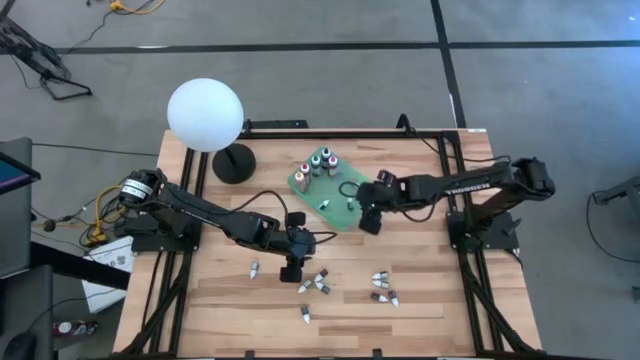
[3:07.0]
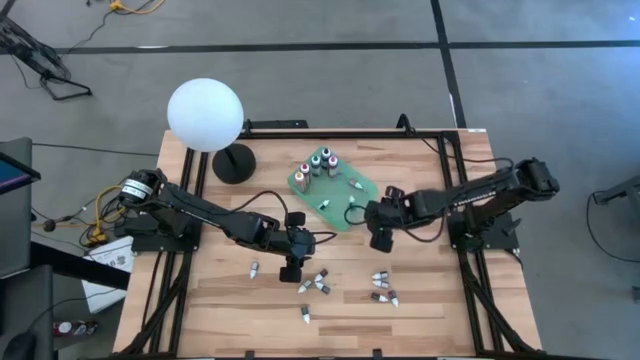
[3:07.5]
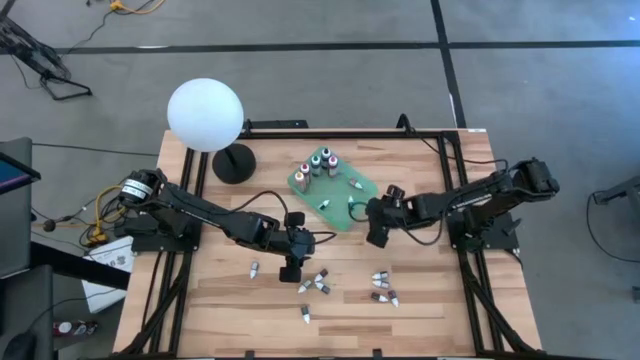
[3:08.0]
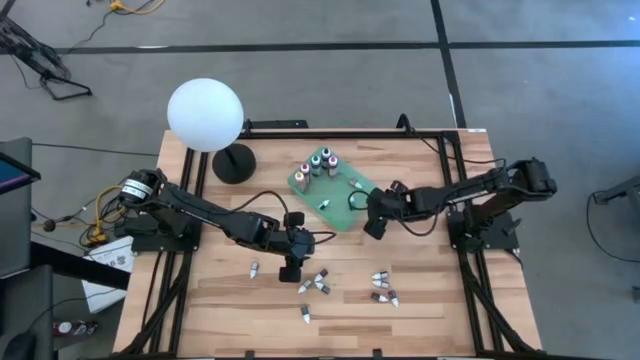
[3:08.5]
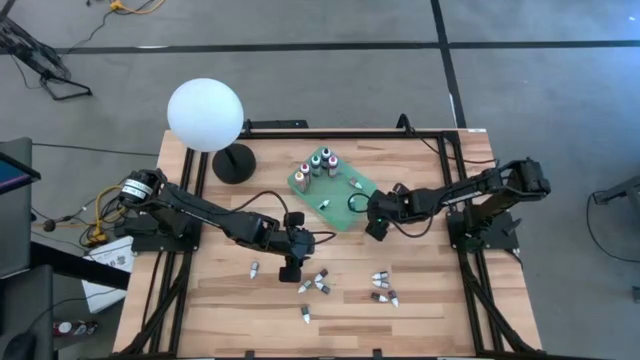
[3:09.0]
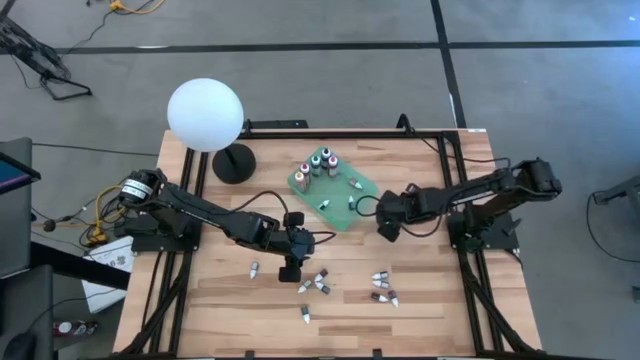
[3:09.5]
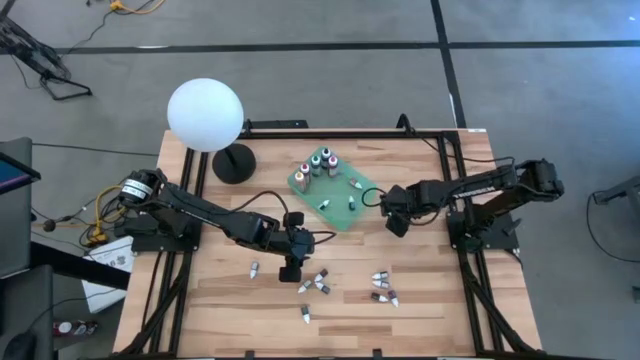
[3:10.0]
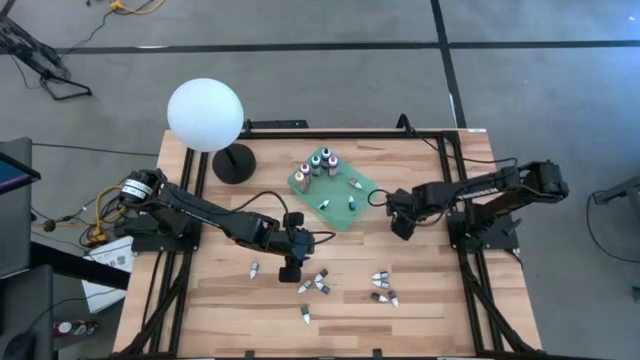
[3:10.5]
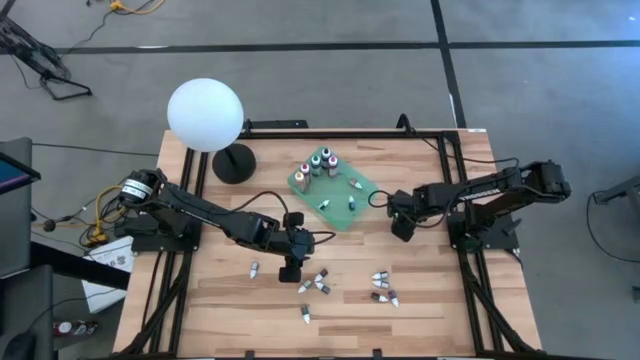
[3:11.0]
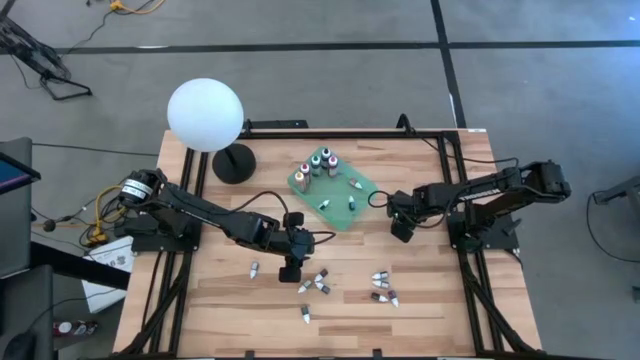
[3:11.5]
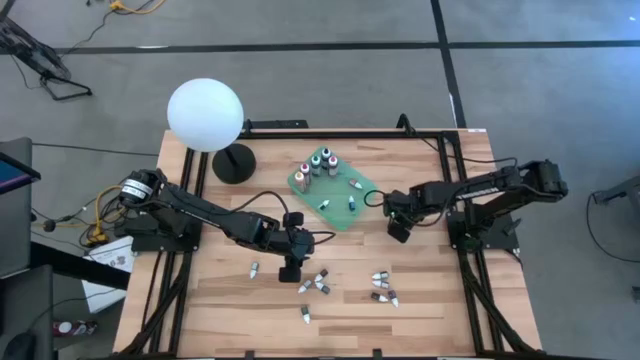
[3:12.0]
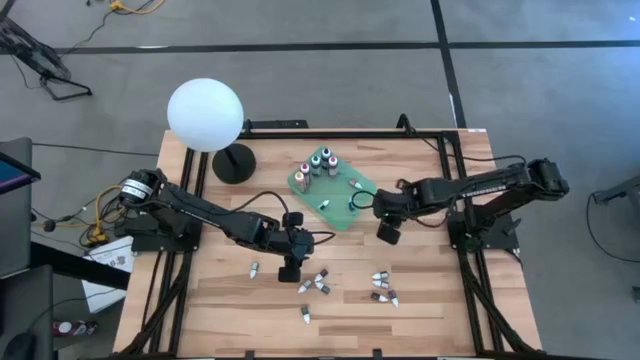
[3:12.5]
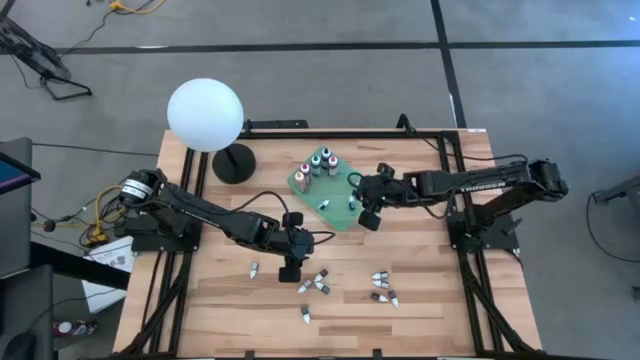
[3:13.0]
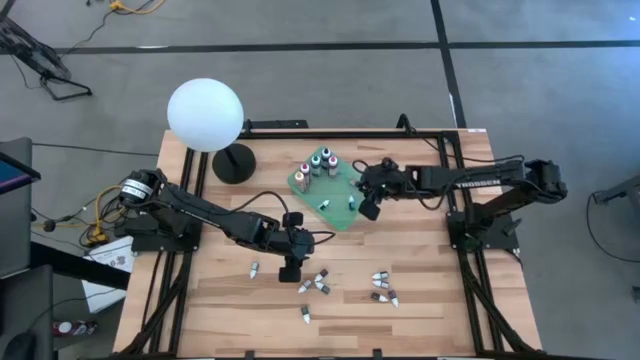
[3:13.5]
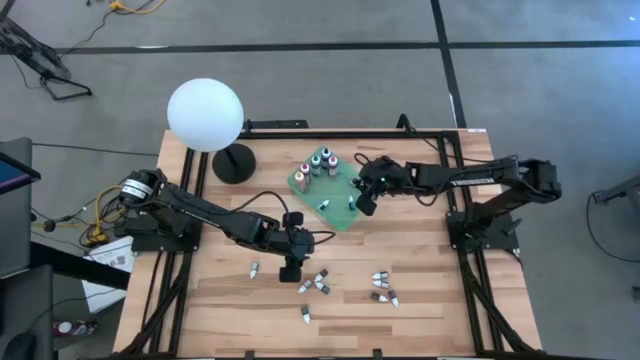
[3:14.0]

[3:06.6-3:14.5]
Task: Pick & Place food coloring
Put the small black food coloring bottle into the green bin

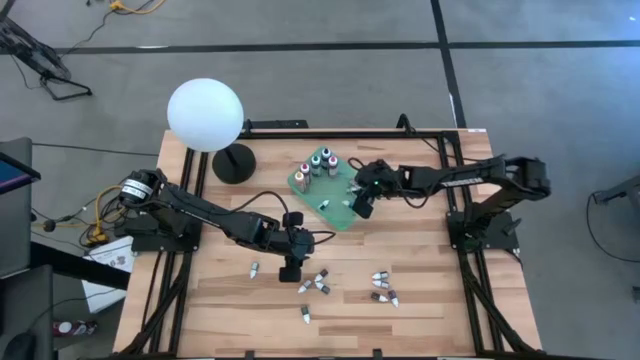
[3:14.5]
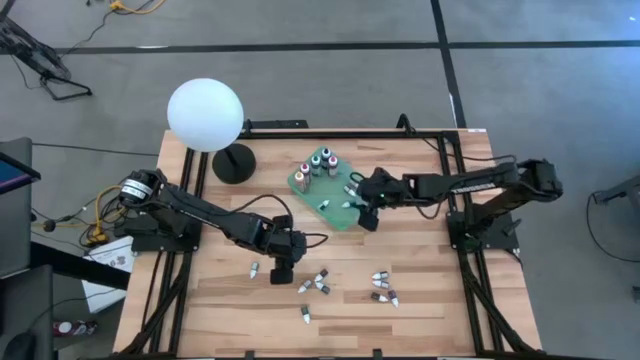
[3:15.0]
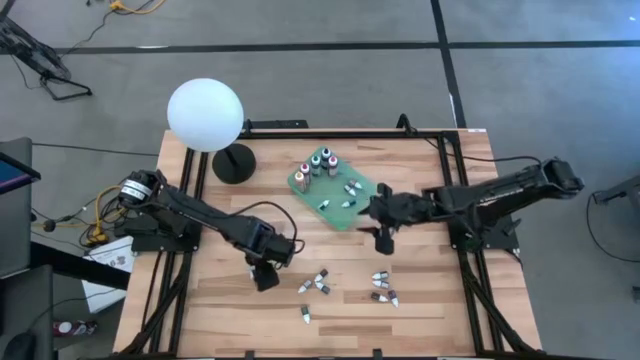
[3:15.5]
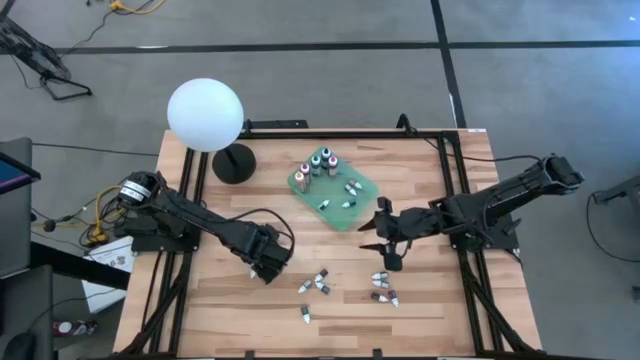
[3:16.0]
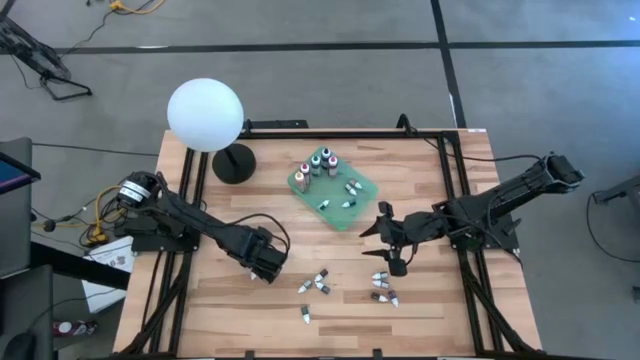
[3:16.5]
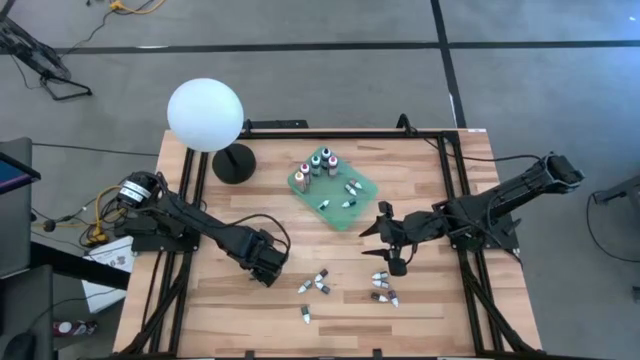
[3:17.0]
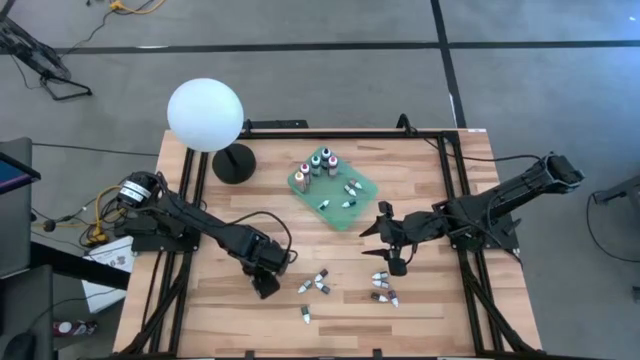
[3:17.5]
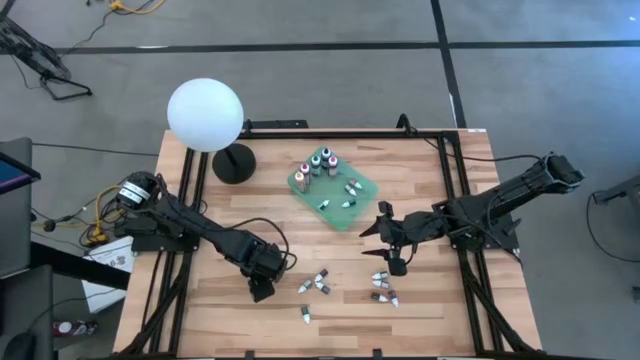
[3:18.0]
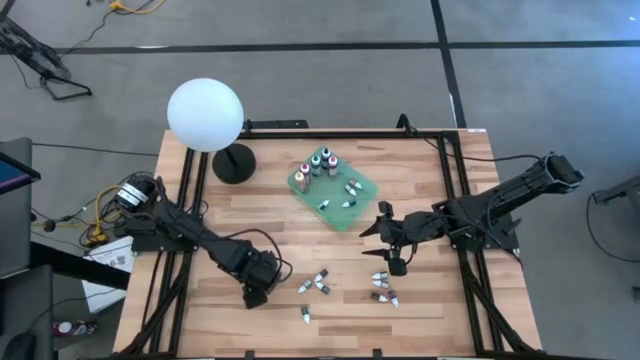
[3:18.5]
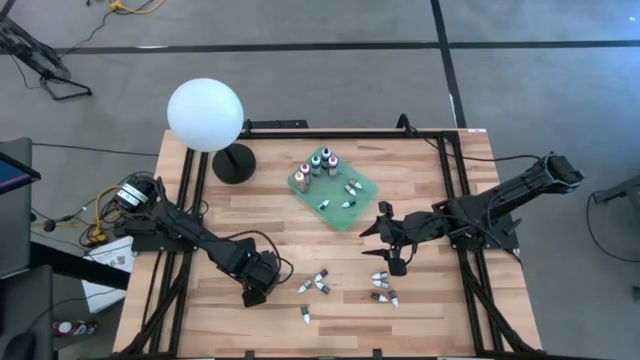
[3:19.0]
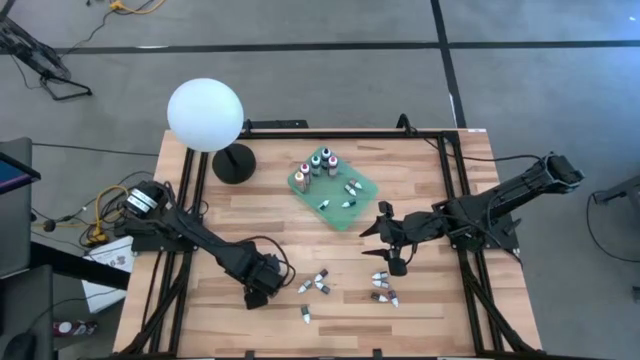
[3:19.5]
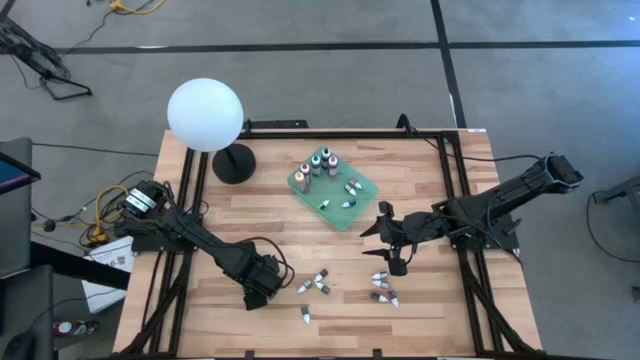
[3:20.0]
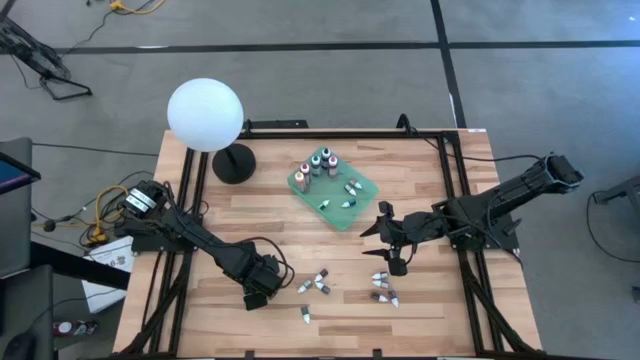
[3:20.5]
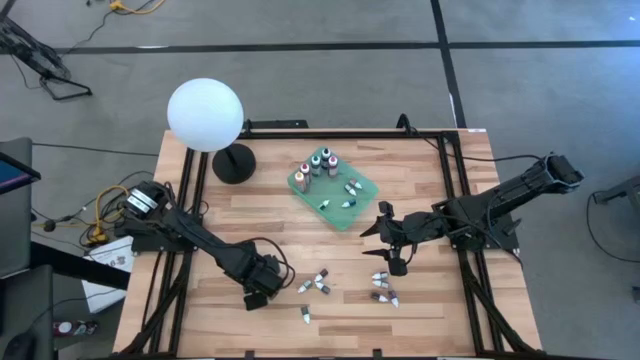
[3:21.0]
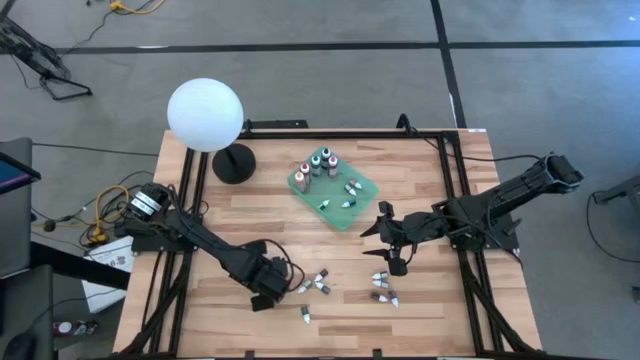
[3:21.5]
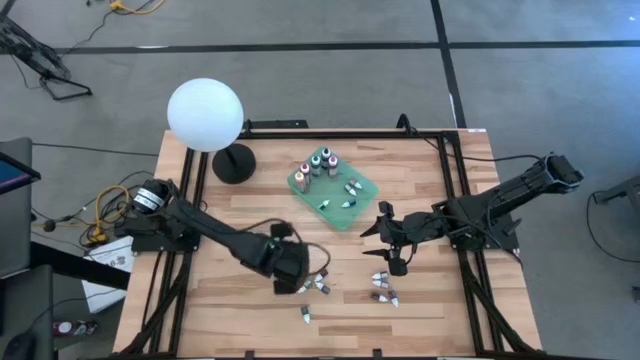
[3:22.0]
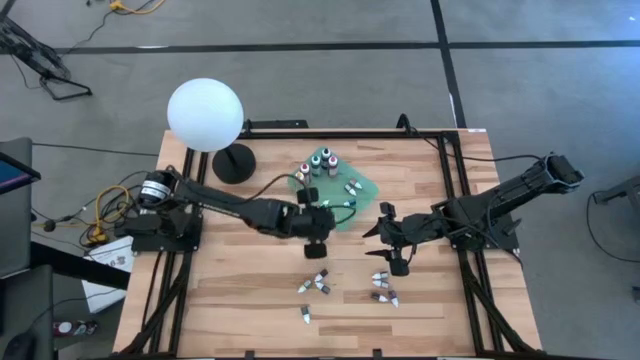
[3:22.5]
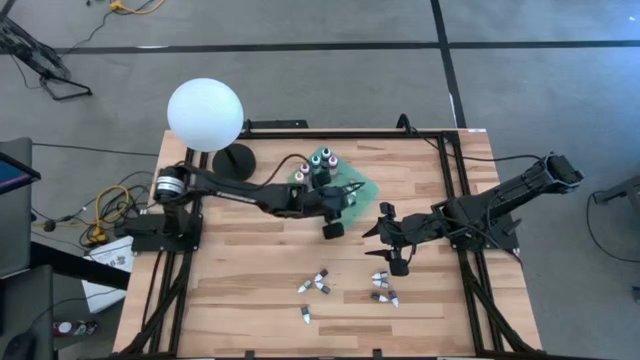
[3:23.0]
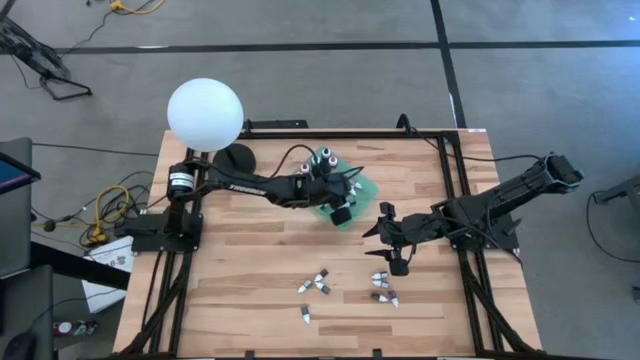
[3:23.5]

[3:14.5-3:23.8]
Put the small brown food coloring bottle into the green bin

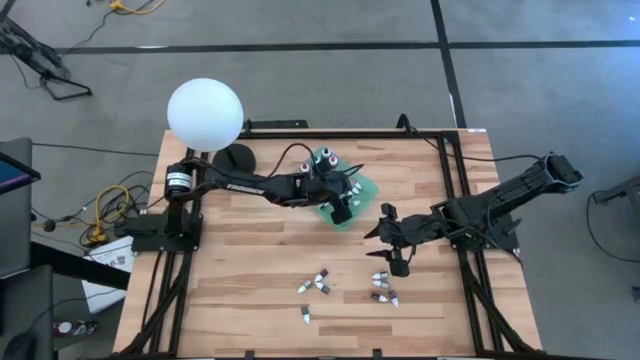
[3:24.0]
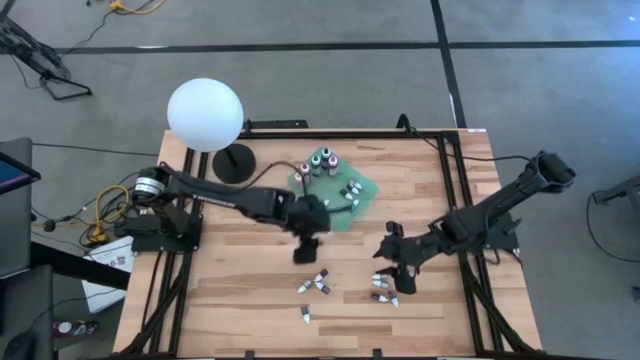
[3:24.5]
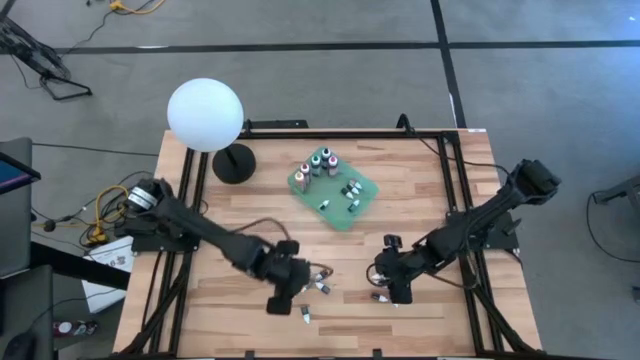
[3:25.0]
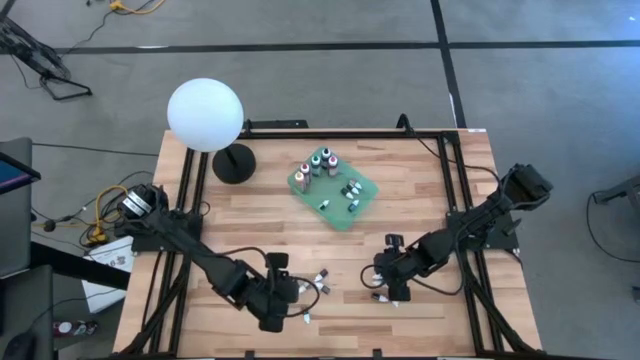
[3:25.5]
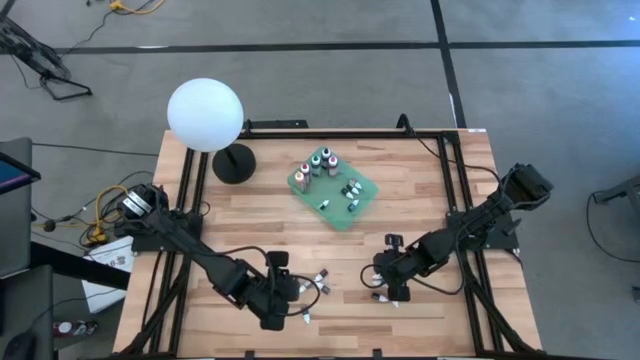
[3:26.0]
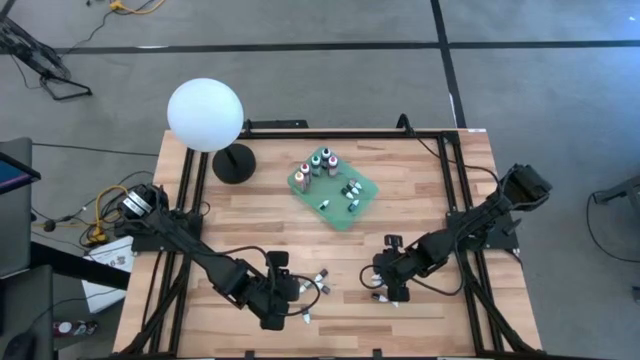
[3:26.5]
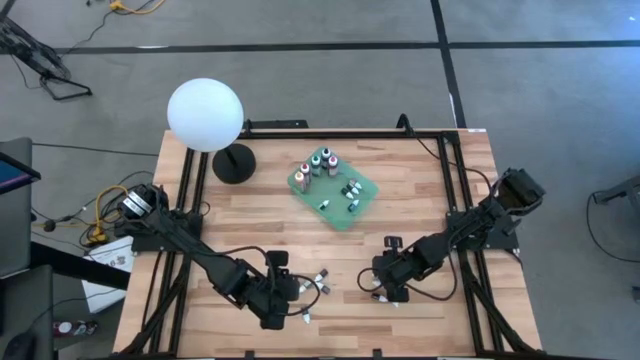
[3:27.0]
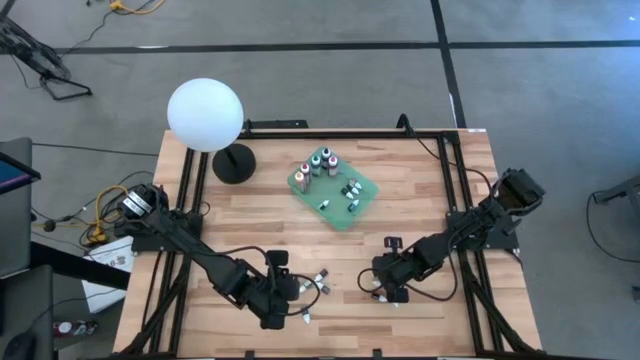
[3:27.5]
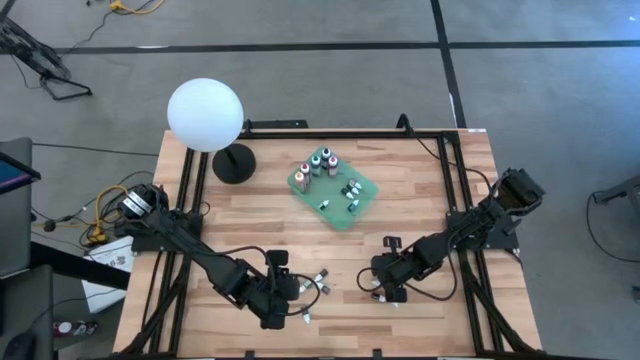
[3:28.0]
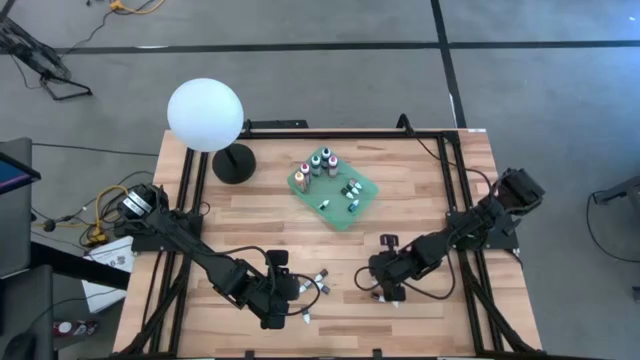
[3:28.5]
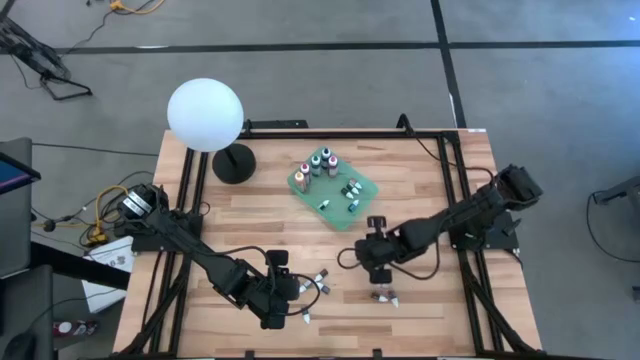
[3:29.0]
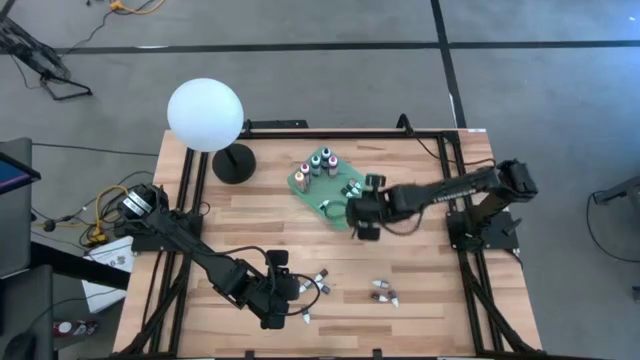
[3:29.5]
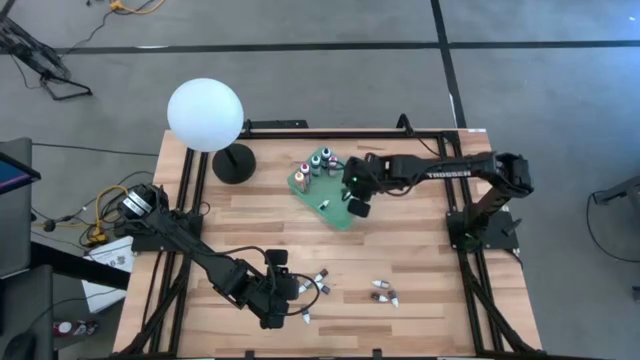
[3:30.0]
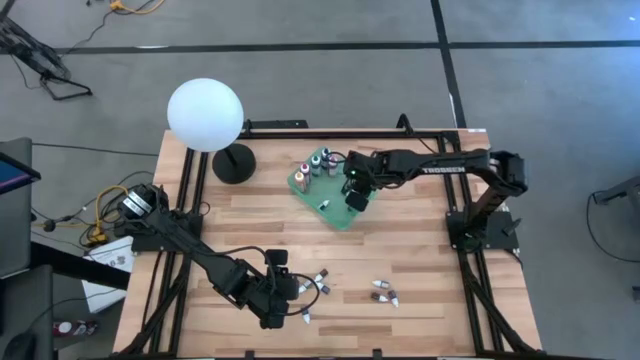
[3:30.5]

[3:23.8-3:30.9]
Put the small brown food coloring bottle into the green bin
